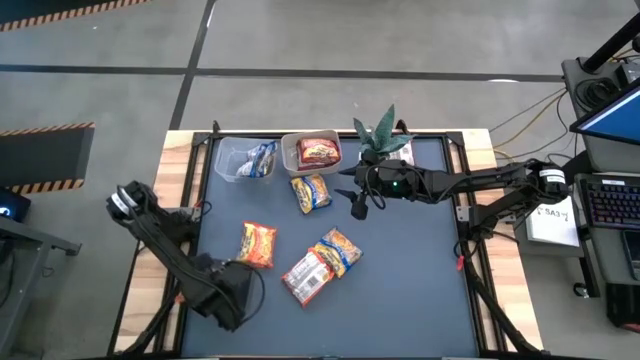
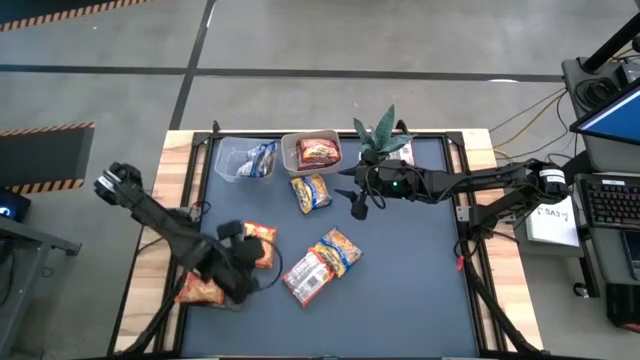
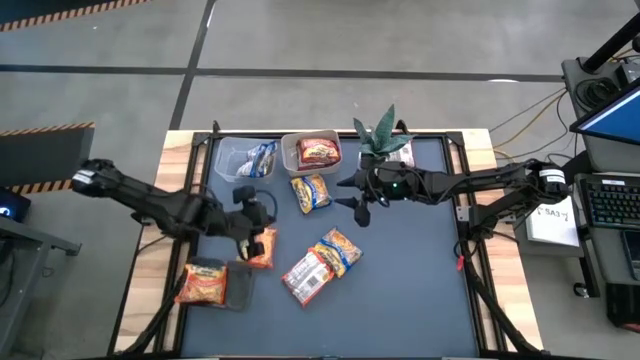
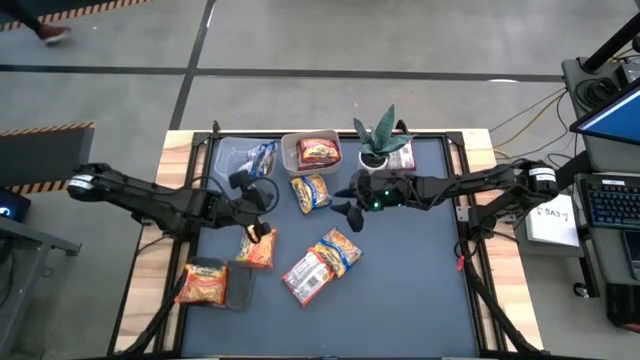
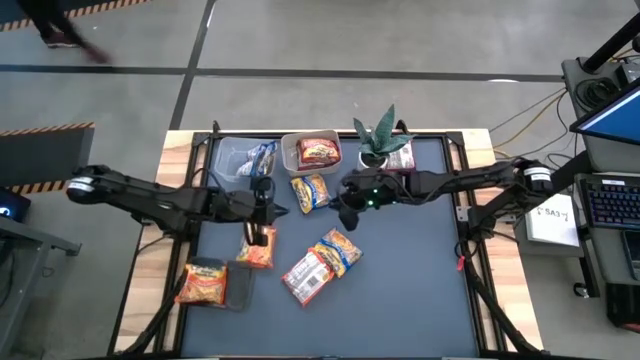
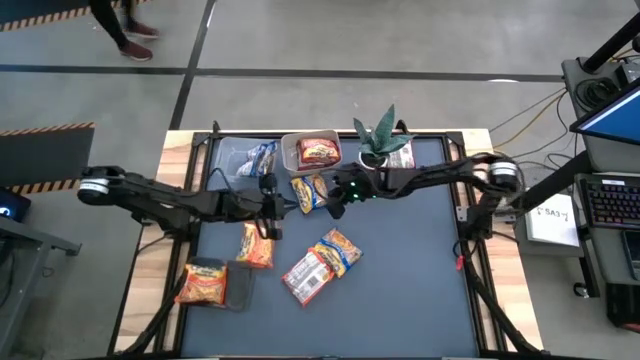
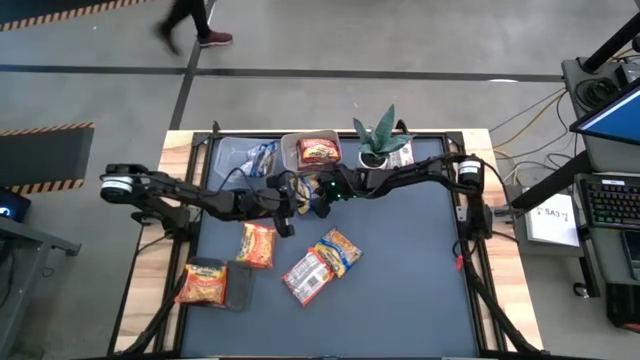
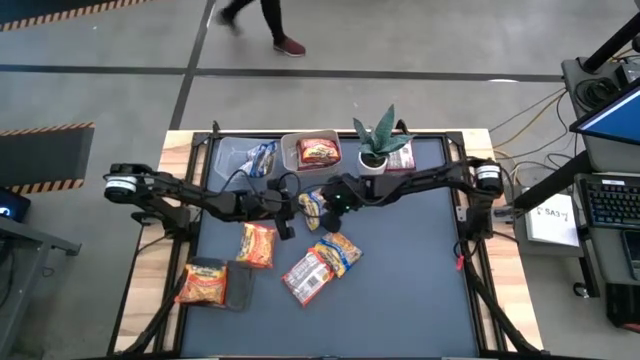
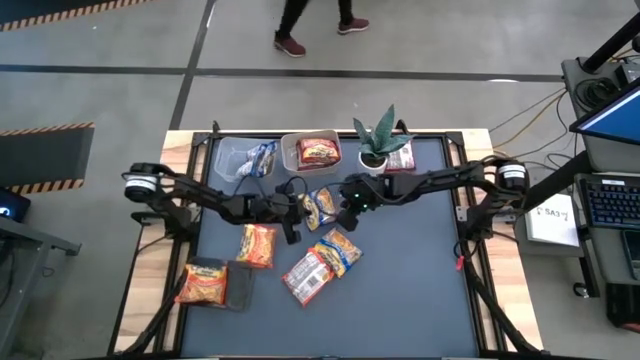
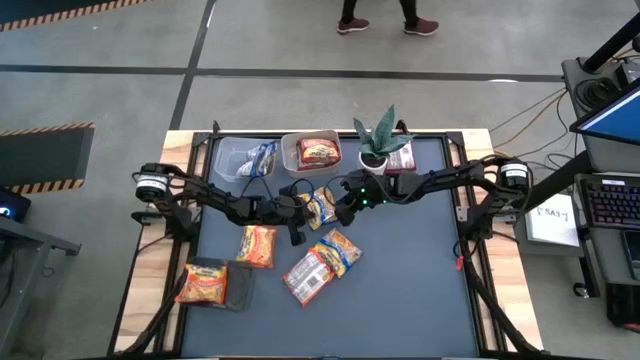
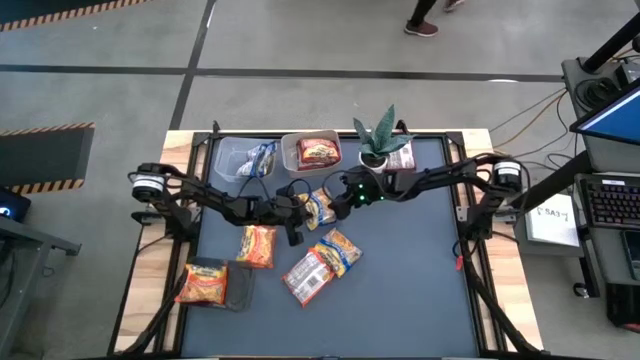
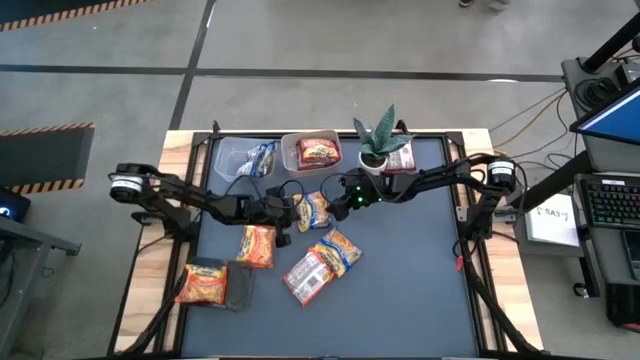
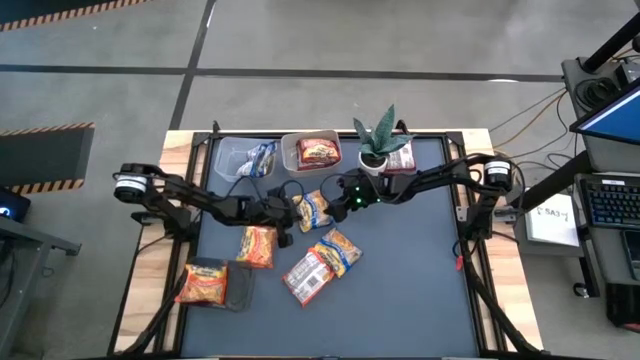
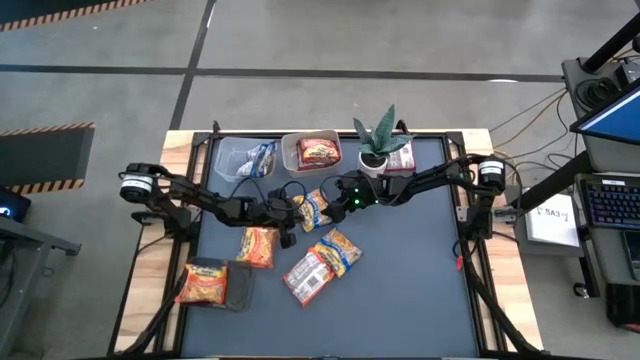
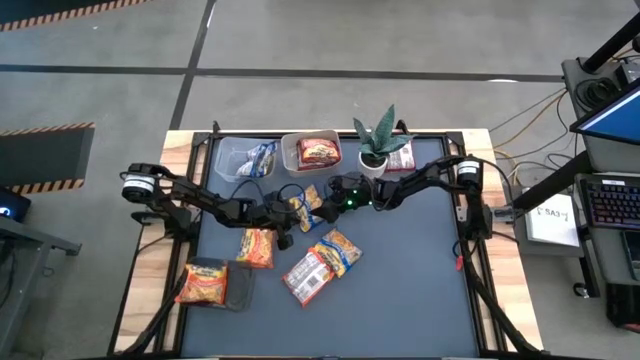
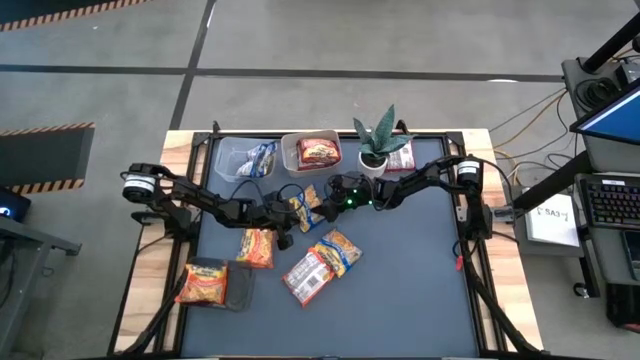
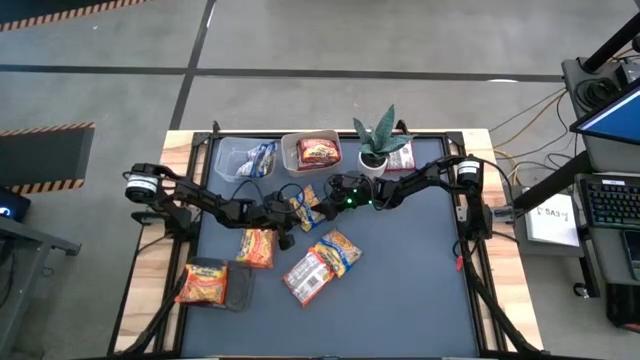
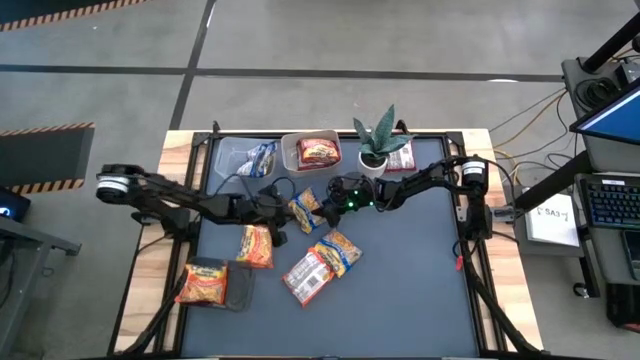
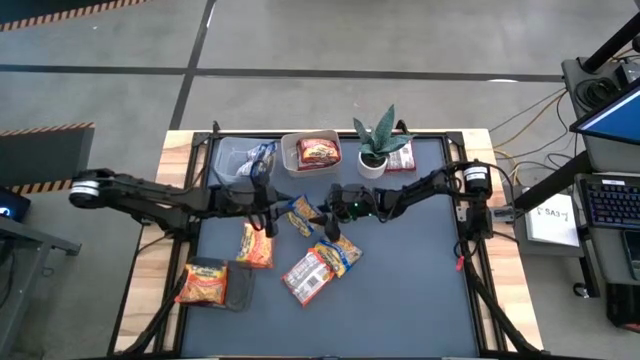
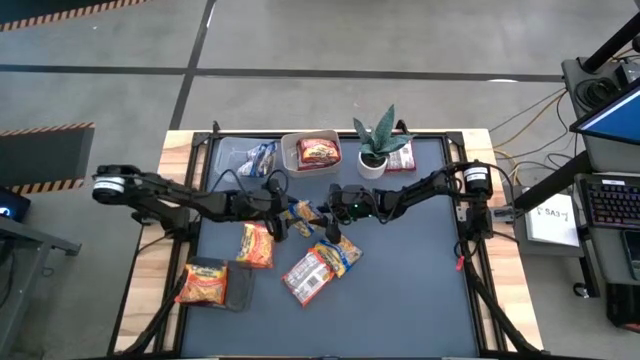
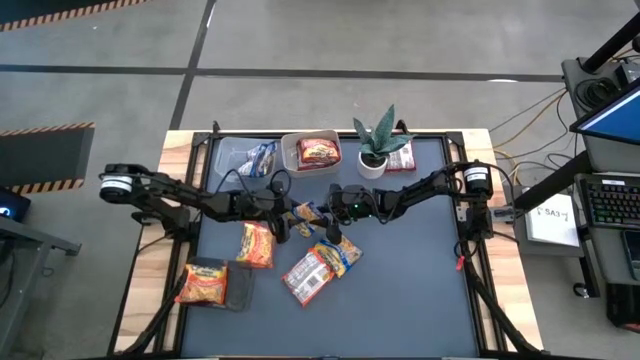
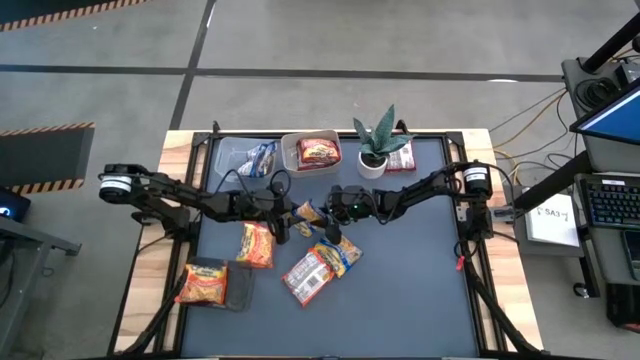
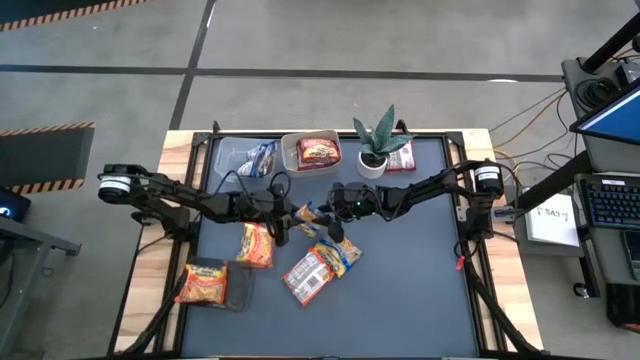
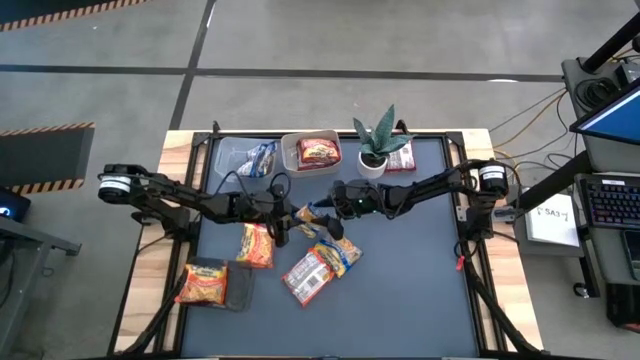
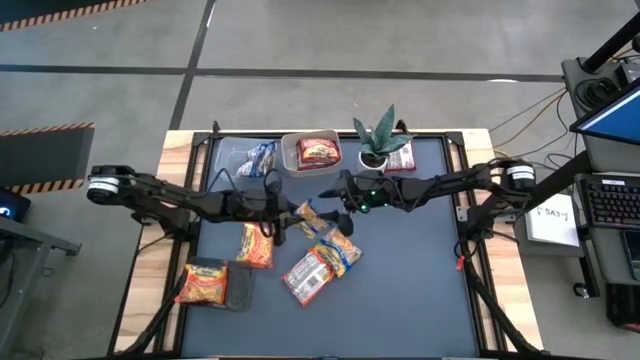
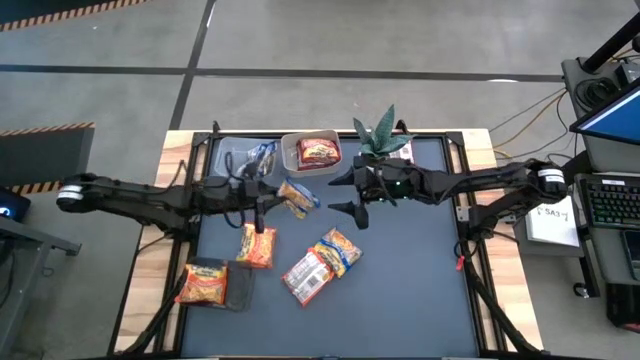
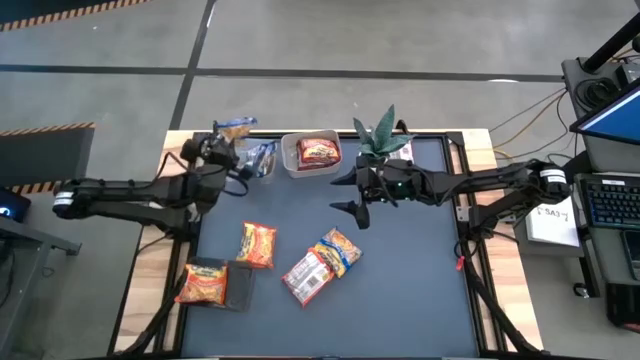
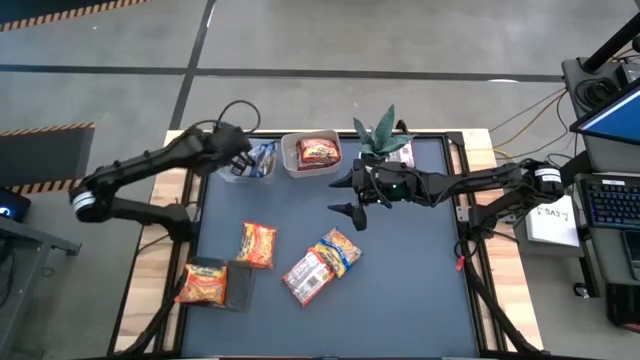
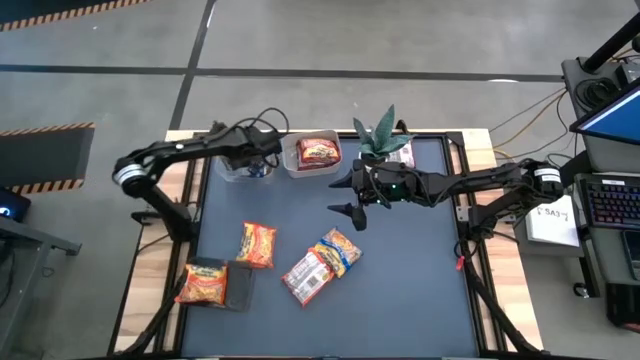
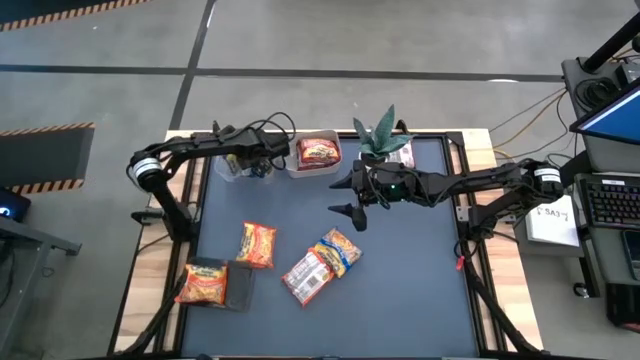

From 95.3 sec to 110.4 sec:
Task: Sort Maruchan noodles
Put the noodle pack into the transparent bin

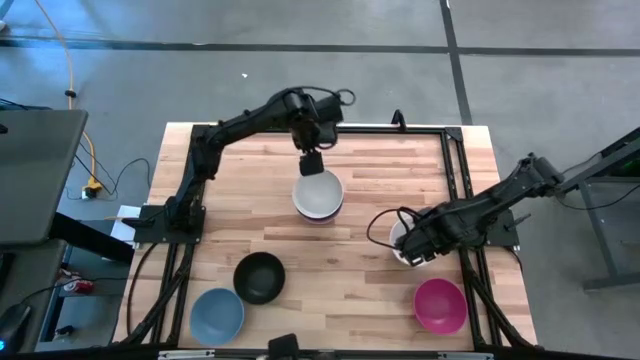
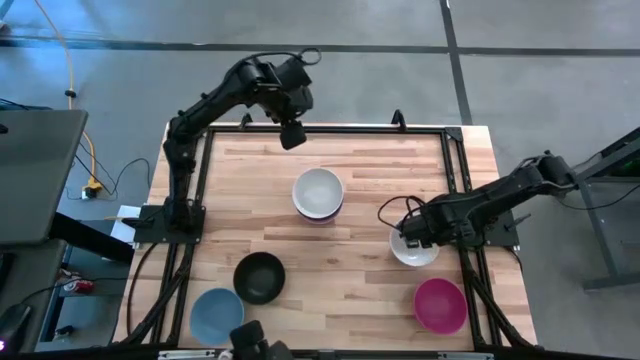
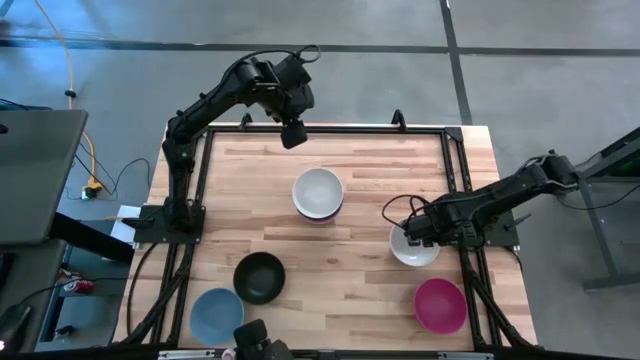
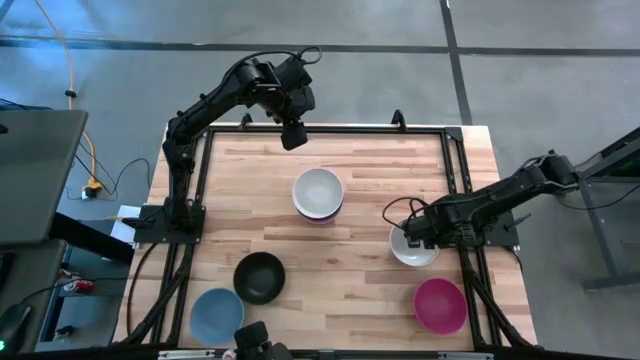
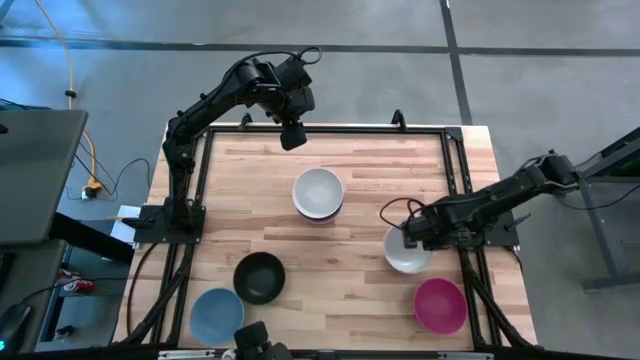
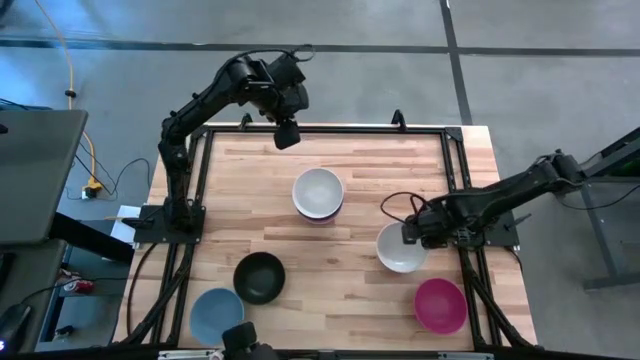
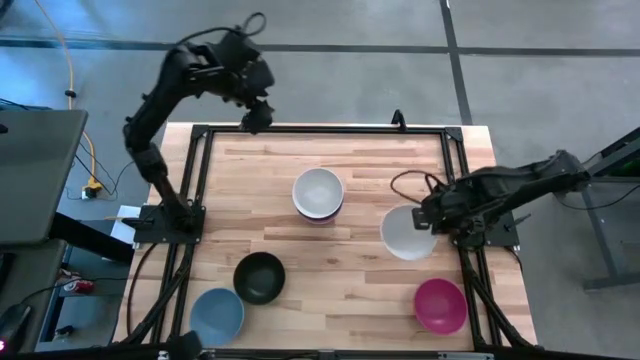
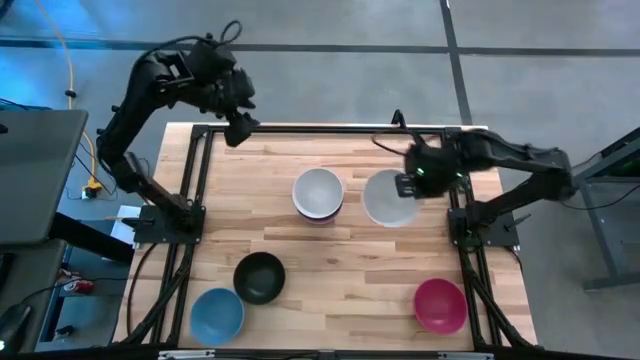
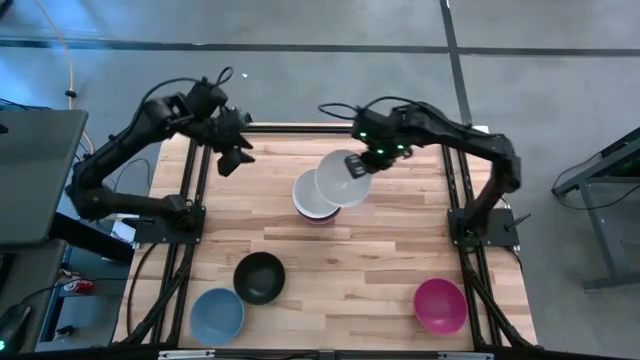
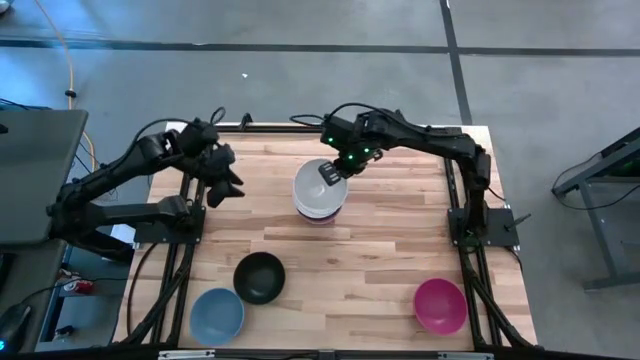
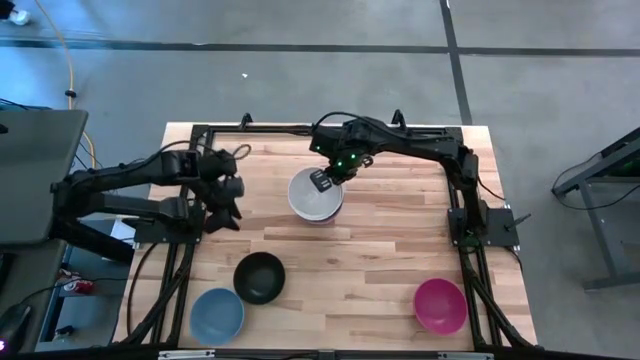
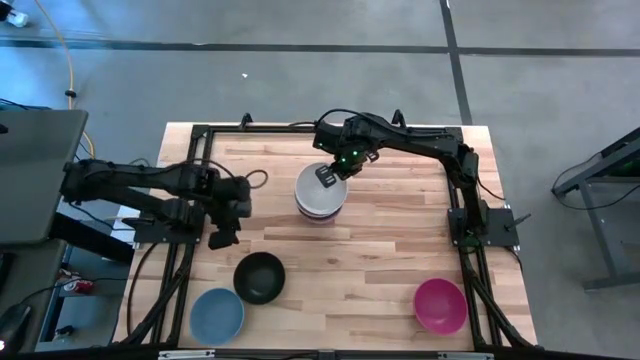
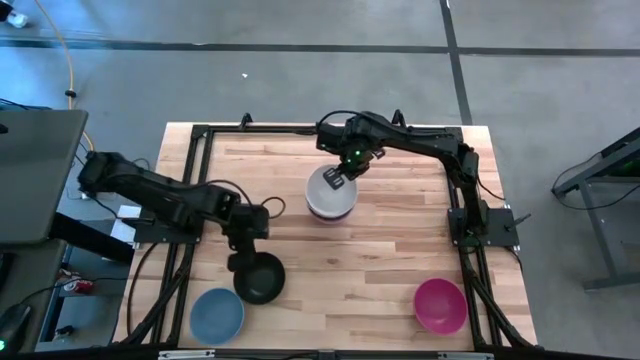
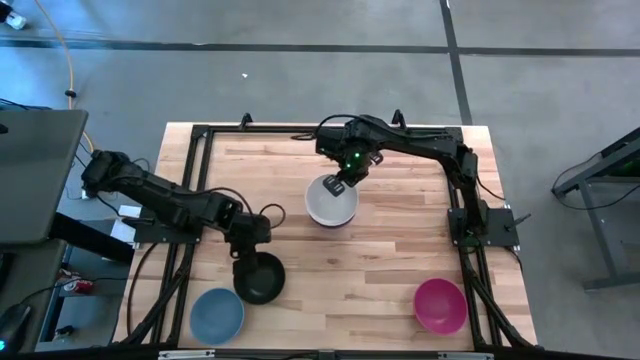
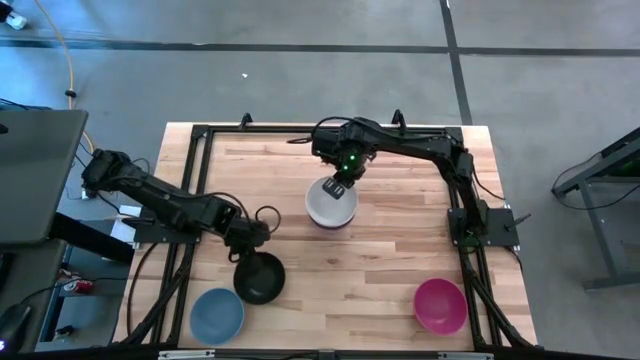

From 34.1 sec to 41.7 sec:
Task: Nest bowls inside each other
Stack the white bowl on top of the white bowl
